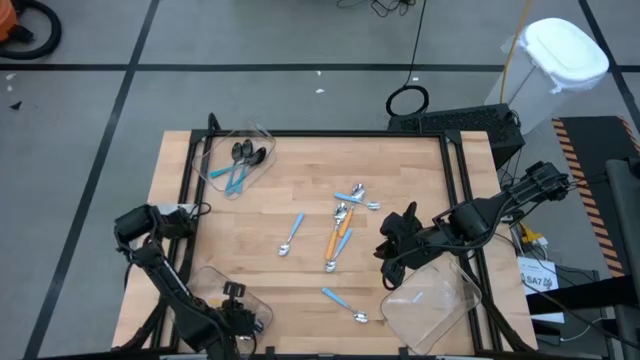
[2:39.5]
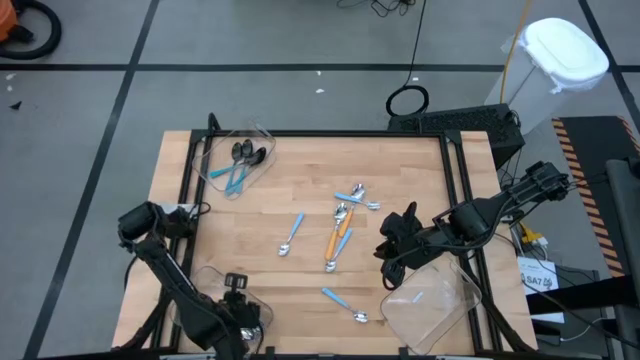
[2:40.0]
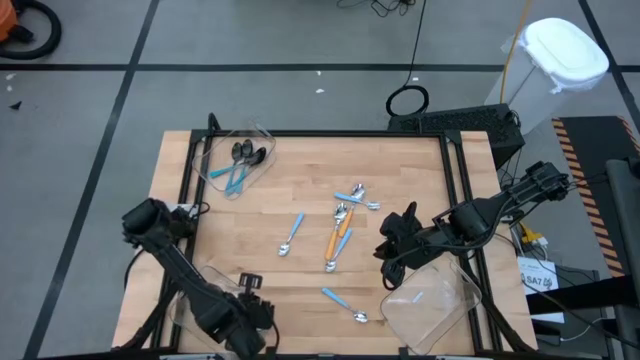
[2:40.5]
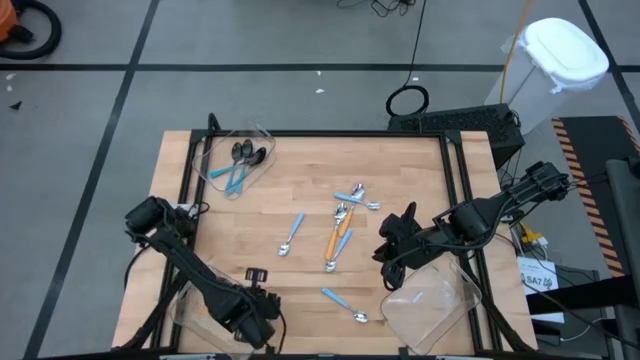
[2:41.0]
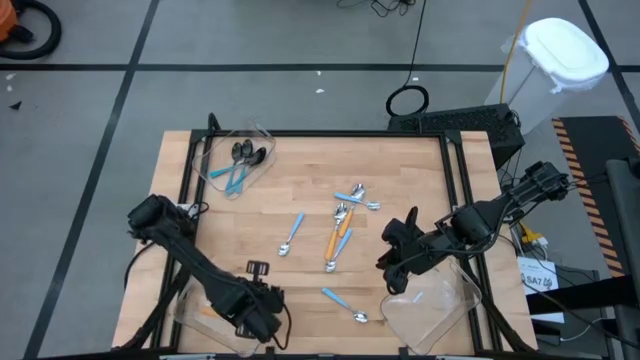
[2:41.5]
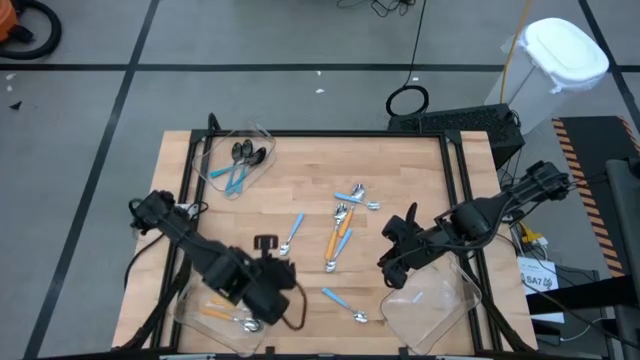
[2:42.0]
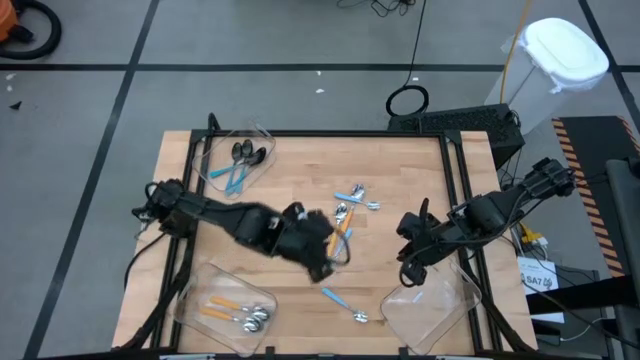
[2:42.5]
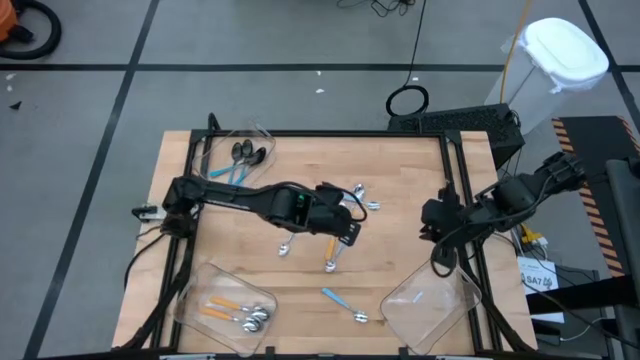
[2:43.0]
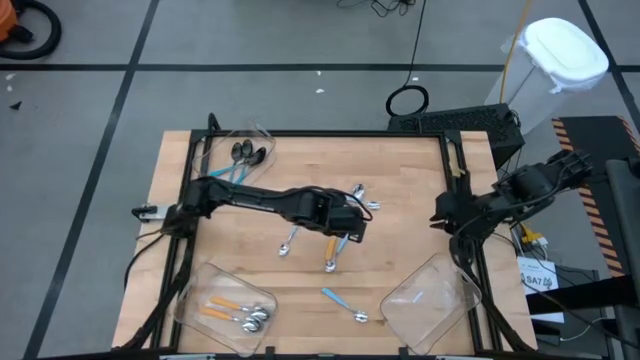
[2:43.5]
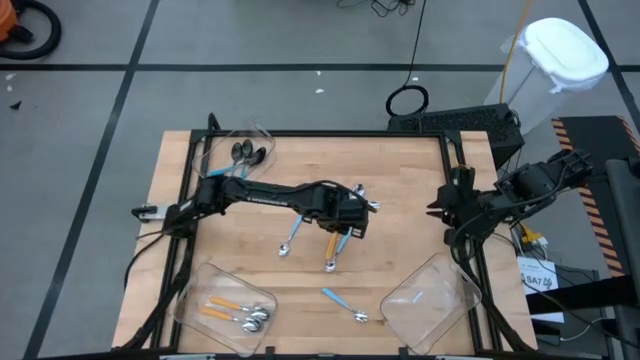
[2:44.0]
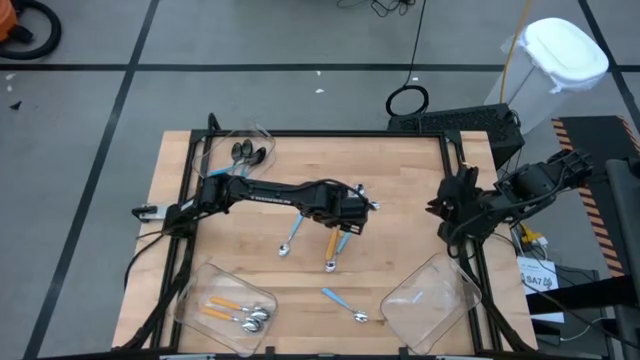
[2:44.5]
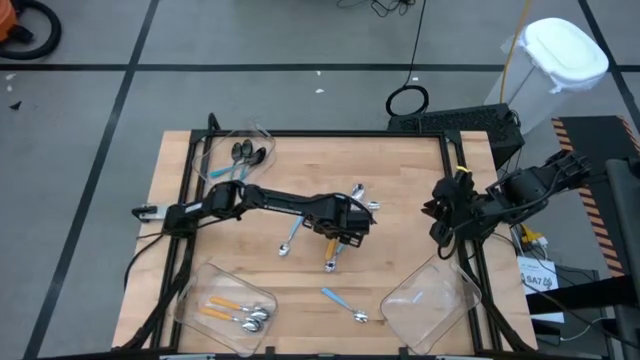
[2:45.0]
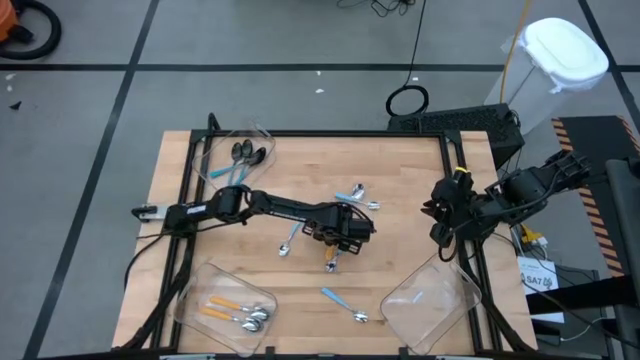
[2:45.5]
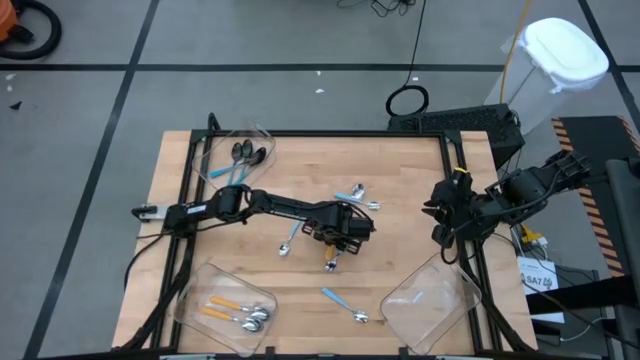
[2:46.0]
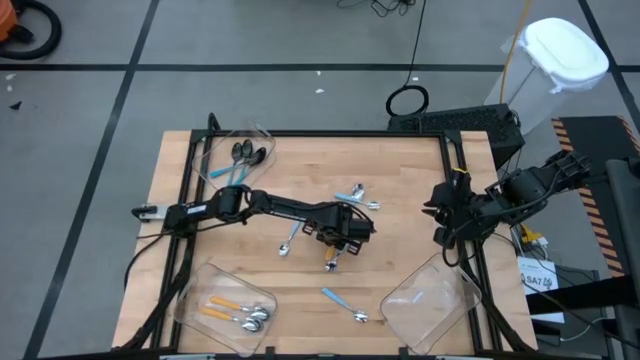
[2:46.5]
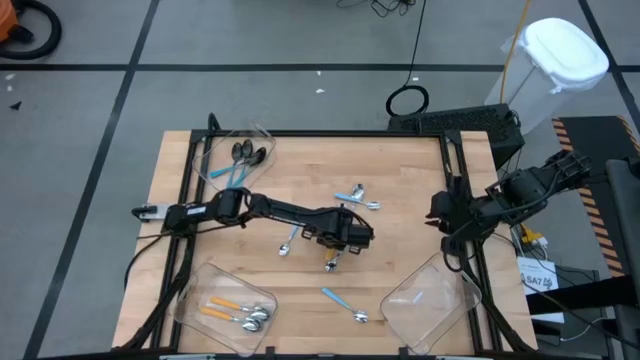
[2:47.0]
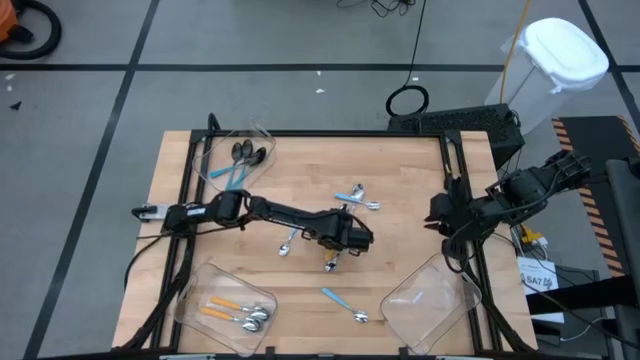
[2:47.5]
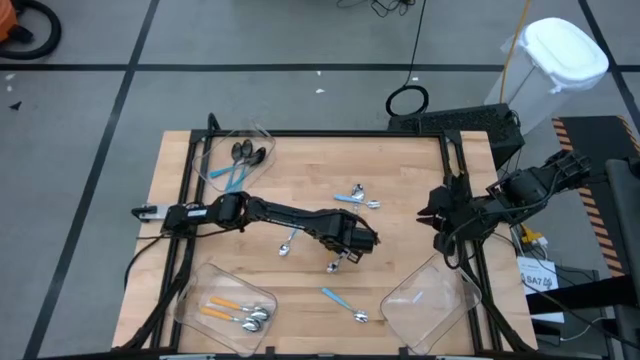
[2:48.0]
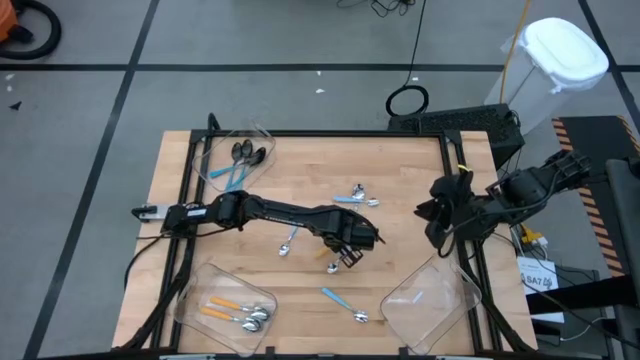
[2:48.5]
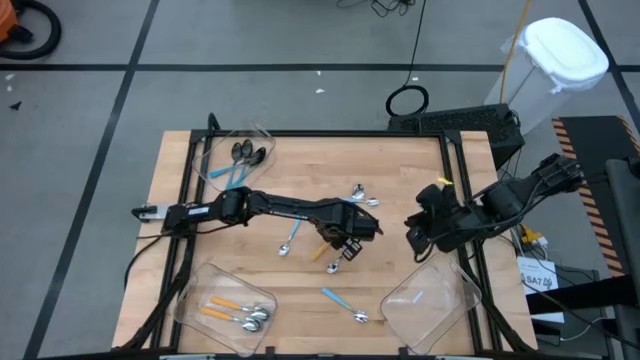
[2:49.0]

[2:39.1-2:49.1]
Task: Sort silverware by color (type)
Put the yellow spoon into the bottom left transparent bin

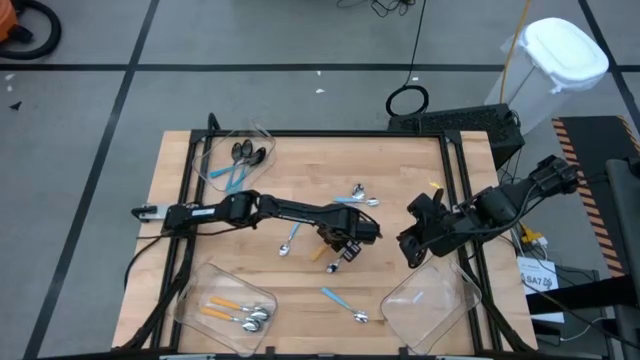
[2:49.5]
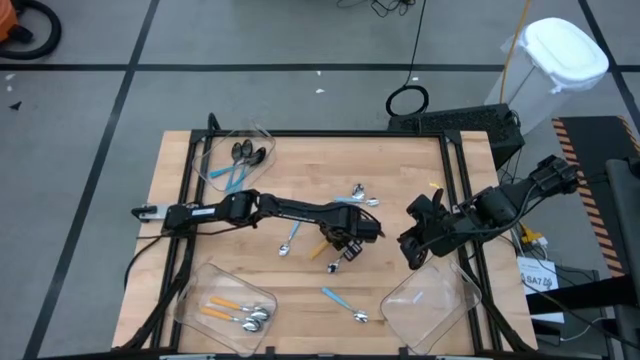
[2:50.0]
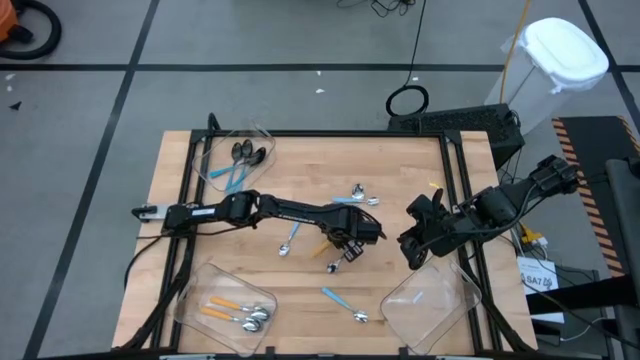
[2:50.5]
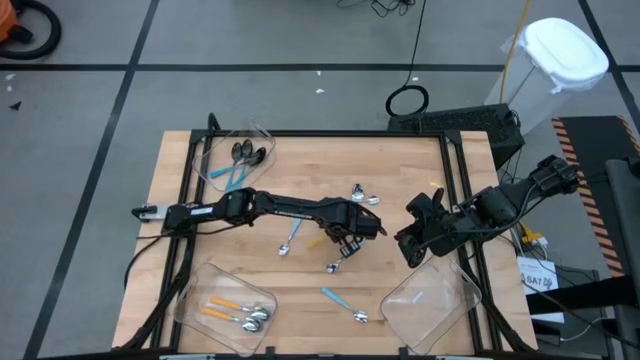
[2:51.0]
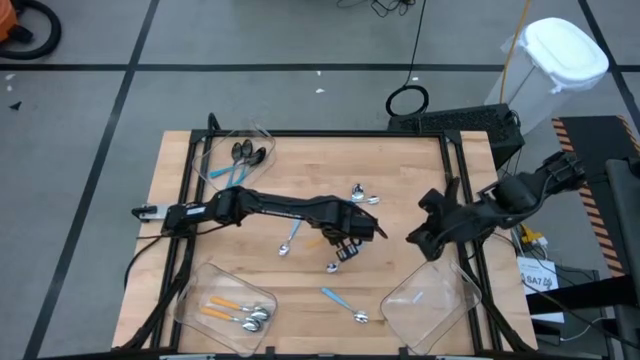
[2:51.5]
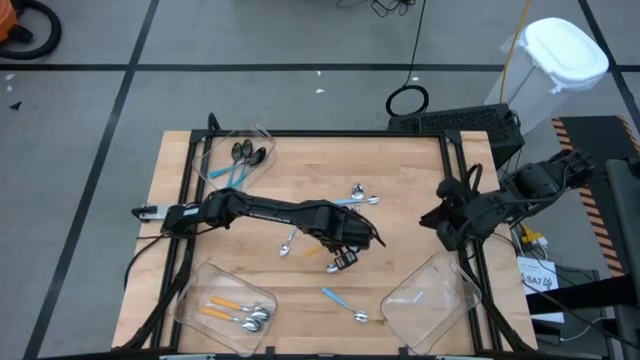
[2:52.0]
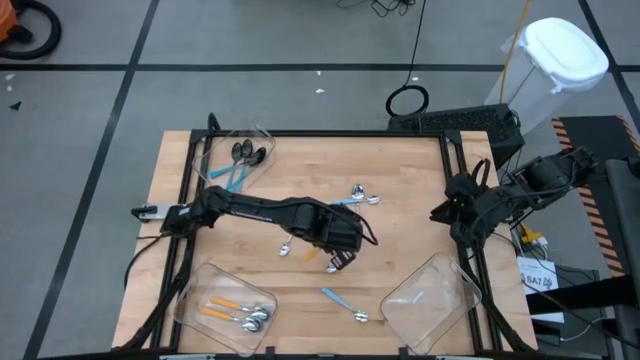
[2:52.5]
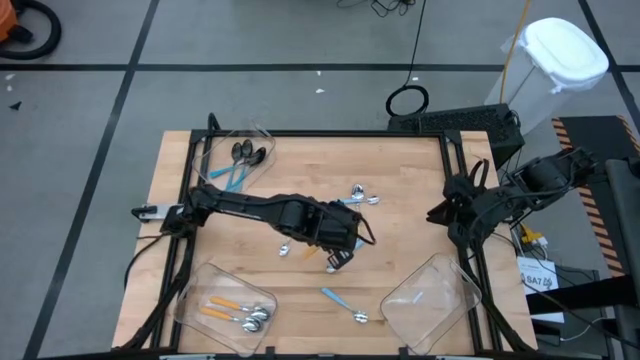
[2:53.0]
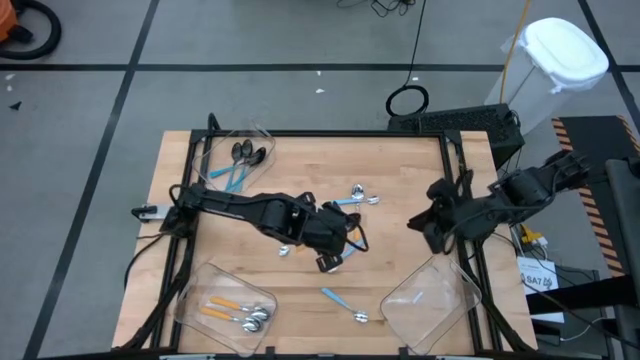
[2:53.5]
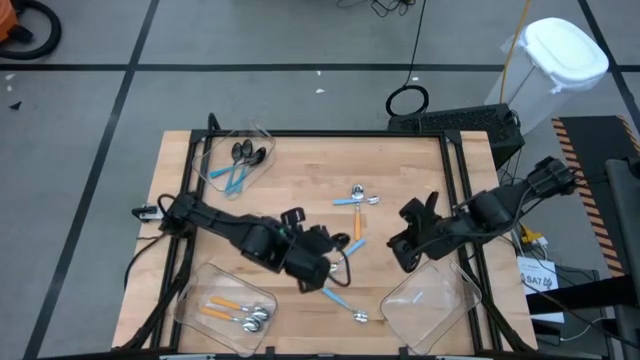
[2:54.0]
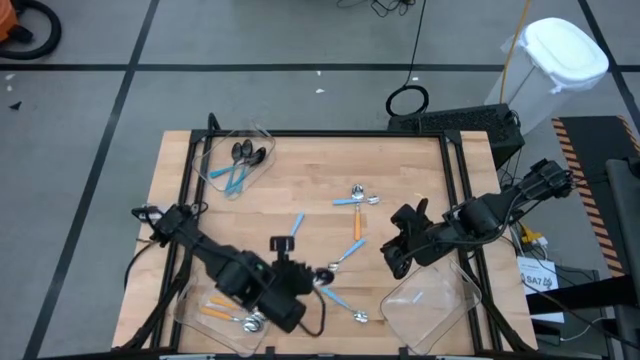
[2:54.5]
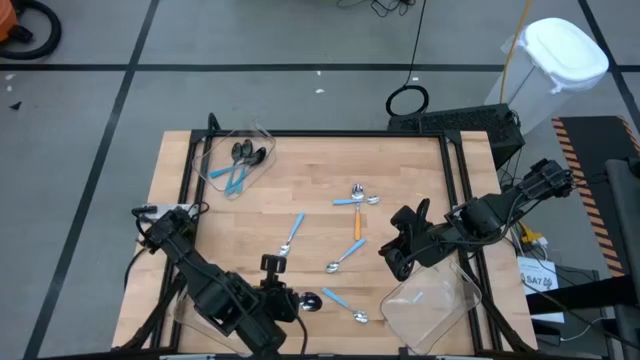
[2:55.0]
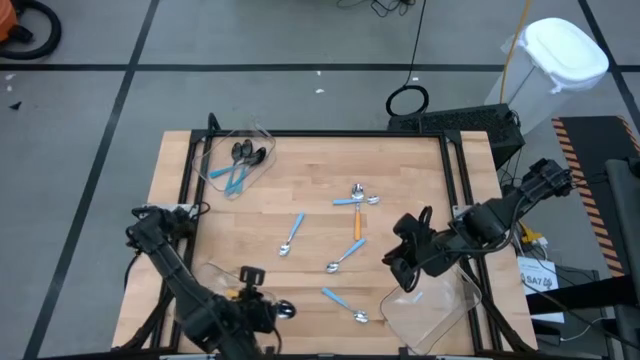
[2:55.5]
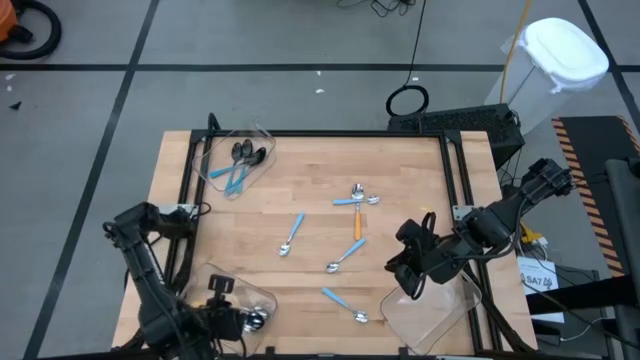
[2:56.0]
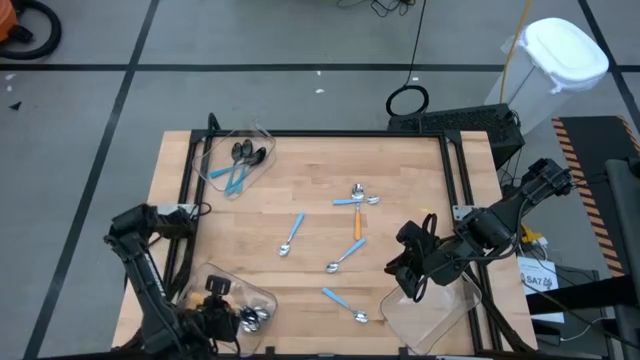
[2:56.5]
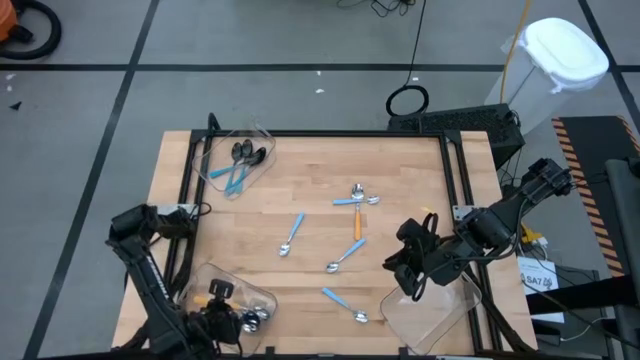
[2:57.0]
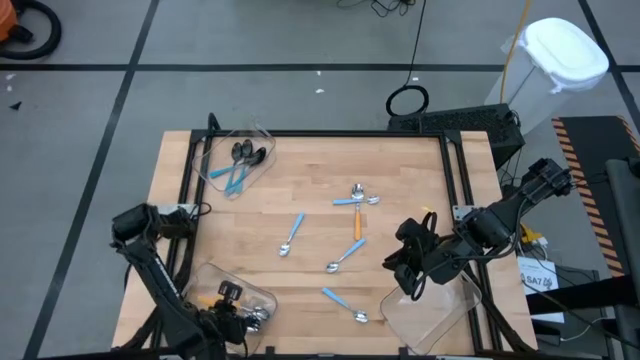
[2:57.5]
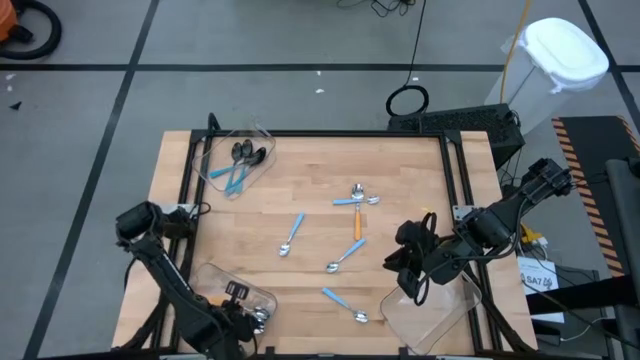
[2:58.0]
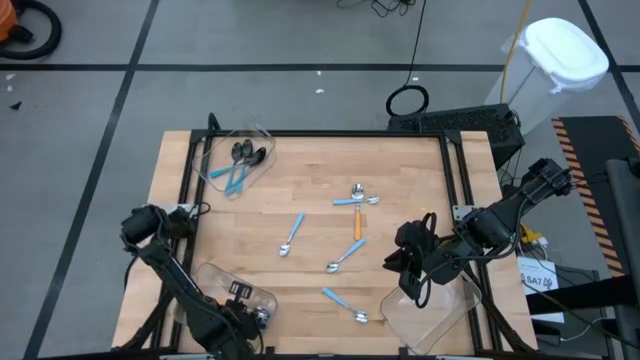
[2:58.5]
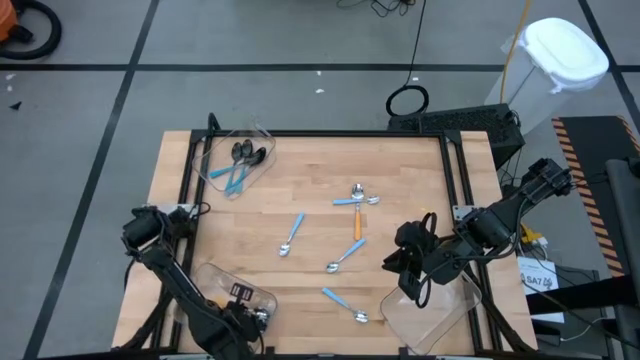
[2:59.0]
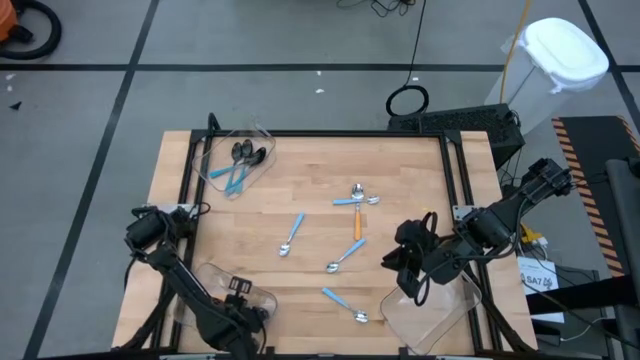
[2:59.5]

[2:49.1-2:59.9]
Put the yellow spoon into the bottom left transparent bin
